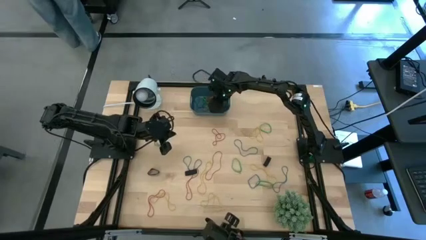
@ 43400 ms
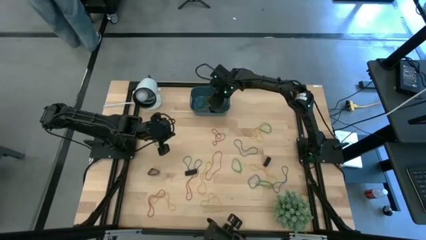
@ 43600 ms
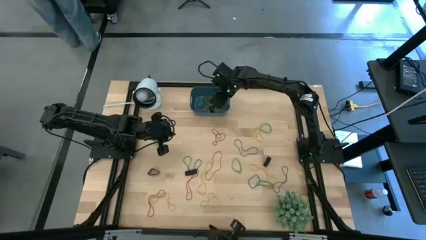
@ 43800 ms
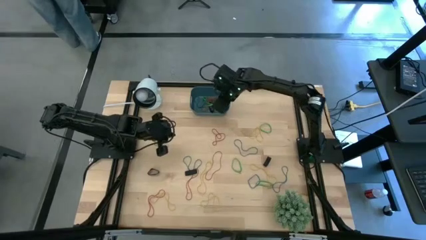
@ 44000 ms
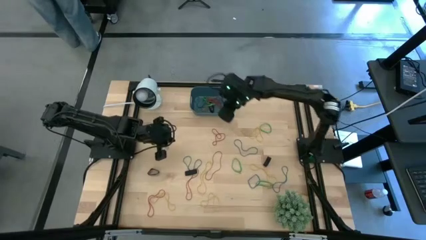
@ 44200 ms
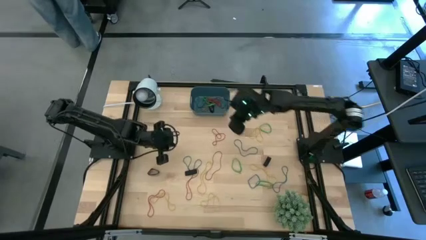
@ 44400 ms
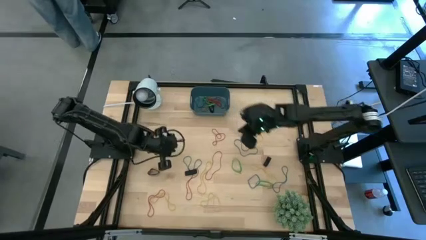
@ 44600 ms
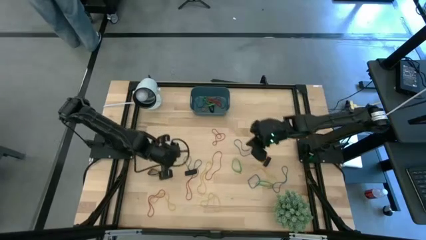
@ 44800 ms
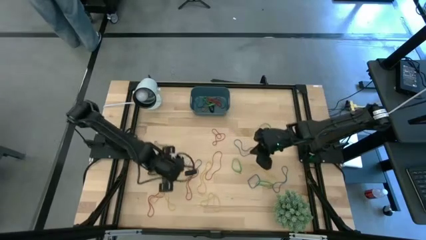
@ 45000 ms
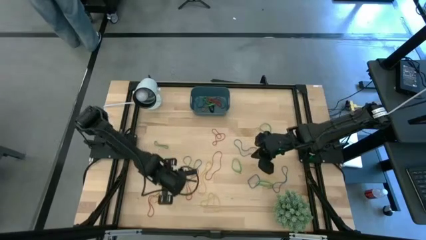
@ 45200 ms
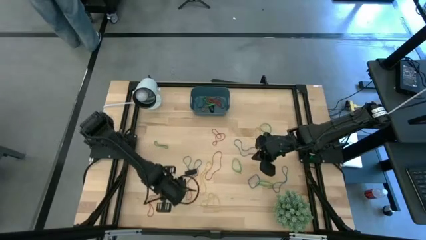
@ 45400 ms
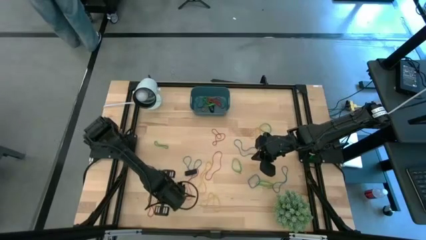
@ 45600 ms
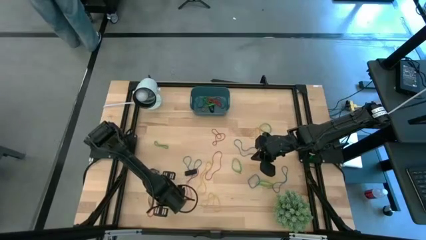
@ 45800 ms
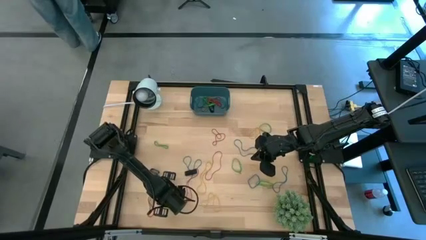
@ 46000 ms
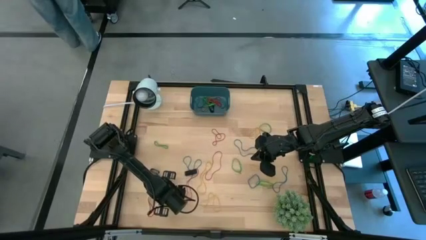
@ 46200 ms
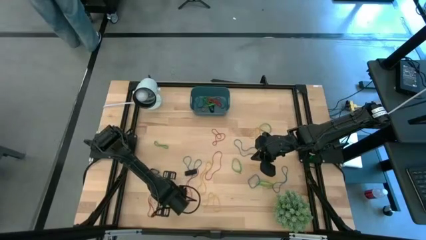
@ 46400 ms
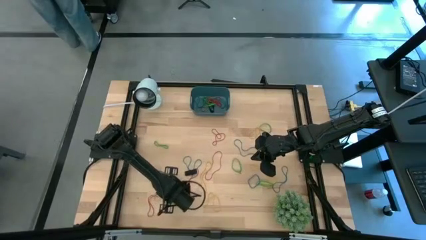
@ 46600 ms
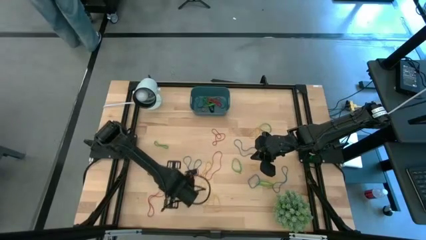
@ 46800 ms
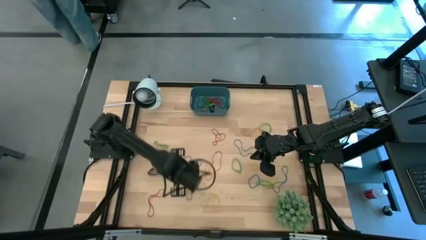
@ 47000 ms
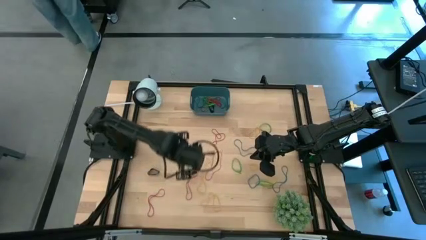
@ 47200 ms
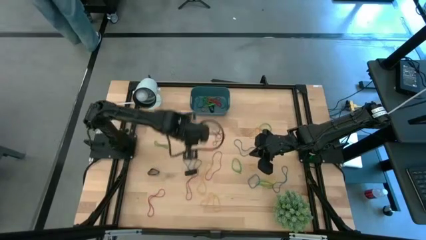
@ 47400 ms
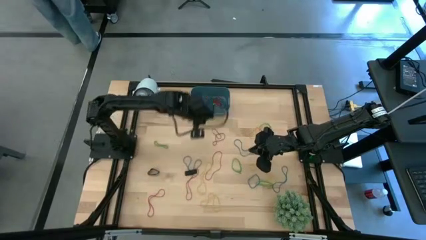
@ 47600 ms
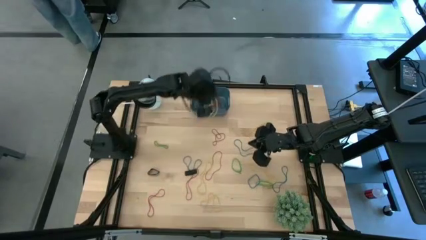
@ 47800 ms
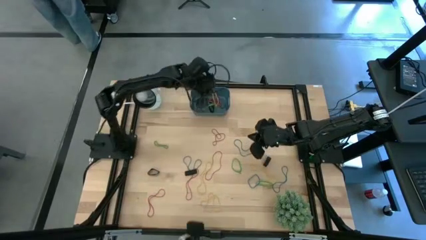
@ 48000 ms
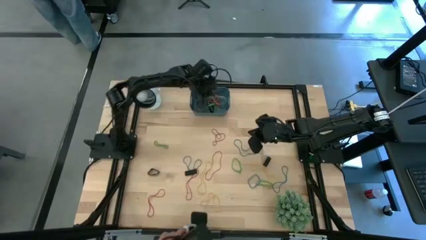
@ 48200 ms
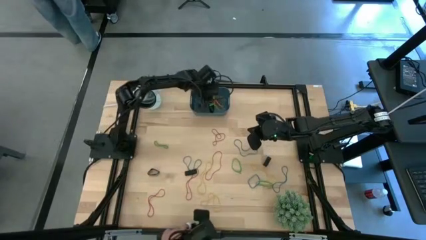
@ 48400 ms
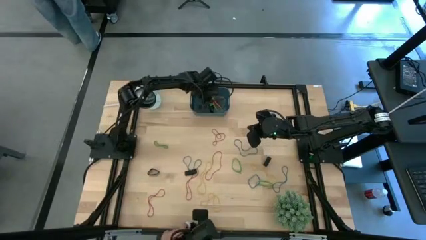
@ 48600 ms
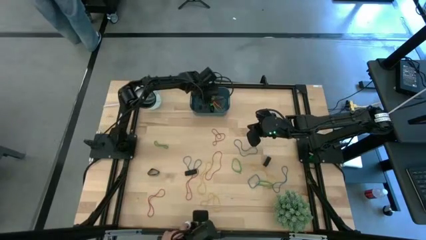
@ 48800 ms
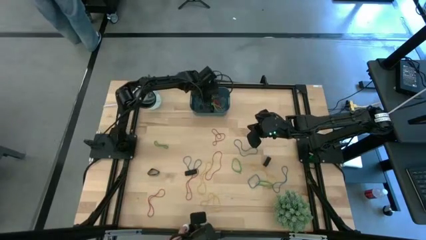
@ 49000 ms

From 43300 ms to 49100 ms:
Task: Pick and place rubber bands into bin
Put the yellow rubber band into the blue bin

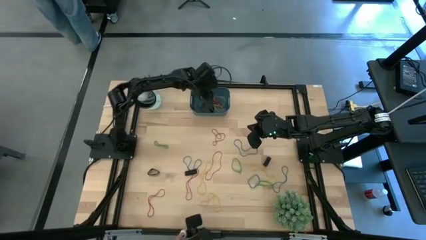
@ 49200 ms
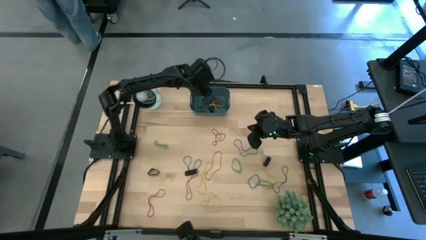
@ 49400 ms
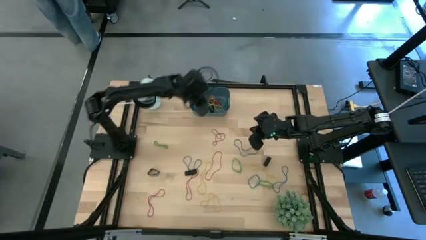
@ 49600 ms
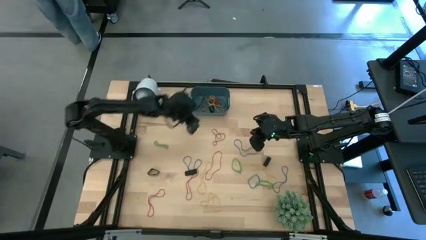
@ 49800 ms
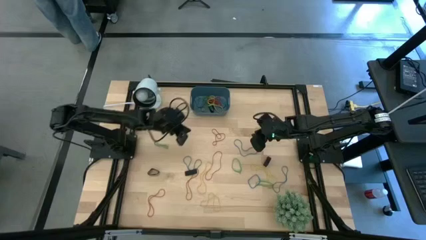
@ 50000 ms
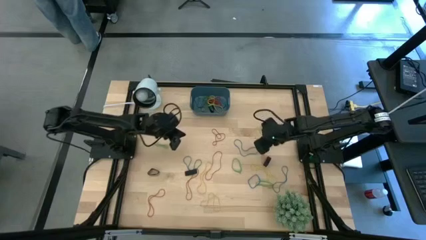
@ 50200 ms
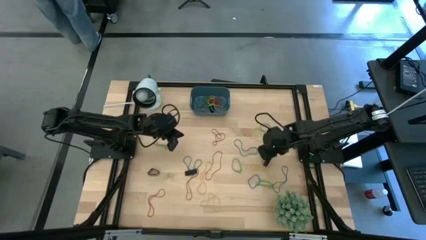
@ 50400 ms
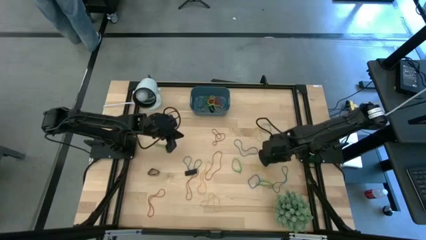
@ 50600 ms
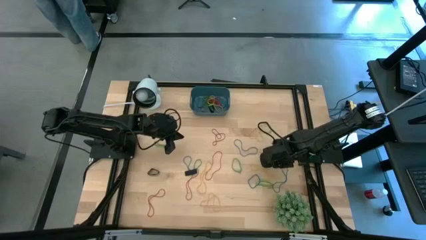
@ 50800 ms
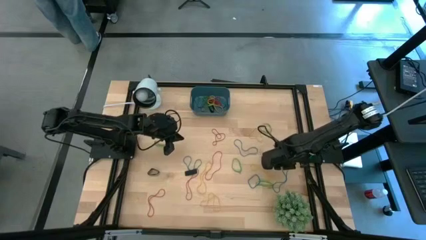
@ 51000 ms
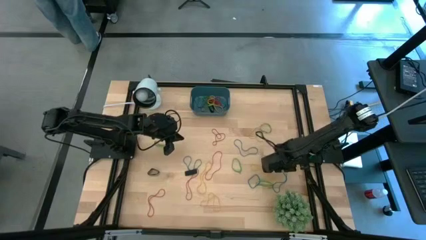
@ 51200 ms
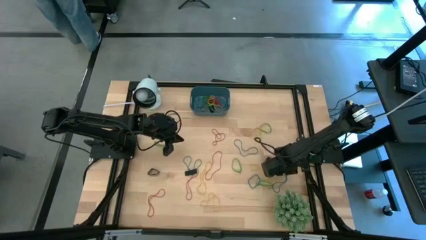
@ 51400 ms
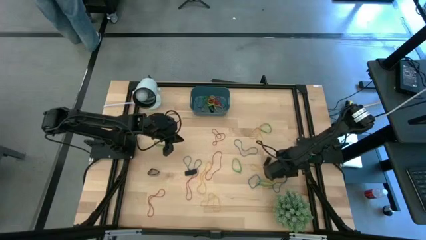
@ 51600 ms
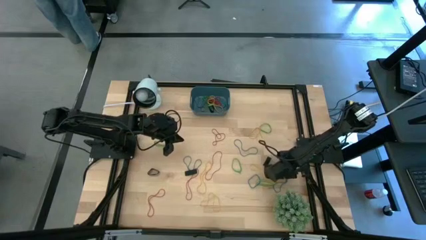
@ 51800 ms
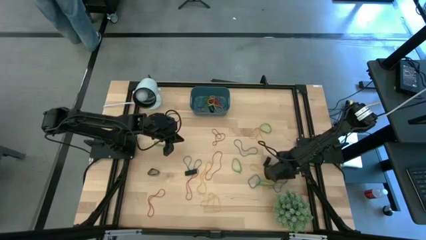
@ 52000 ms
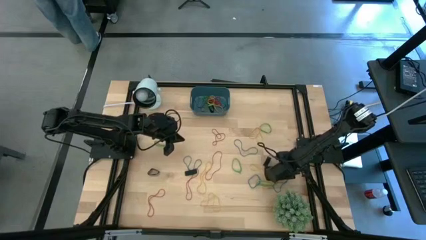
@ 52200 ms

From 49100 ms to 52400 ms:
Put the blue rubber band into the blue bin

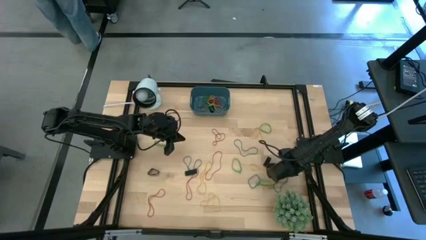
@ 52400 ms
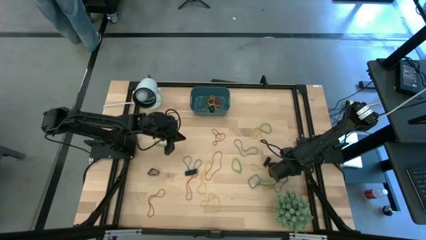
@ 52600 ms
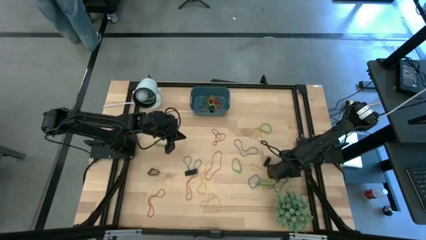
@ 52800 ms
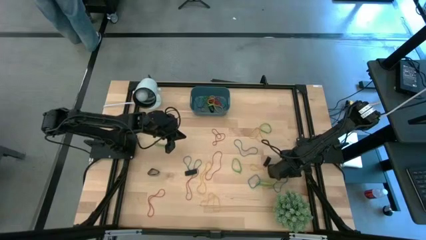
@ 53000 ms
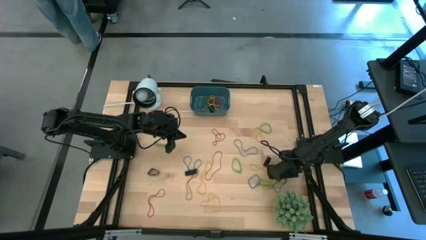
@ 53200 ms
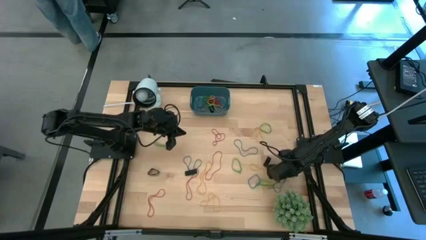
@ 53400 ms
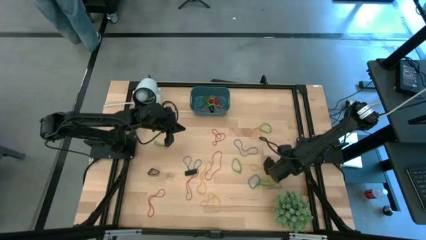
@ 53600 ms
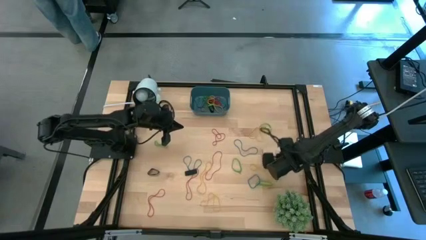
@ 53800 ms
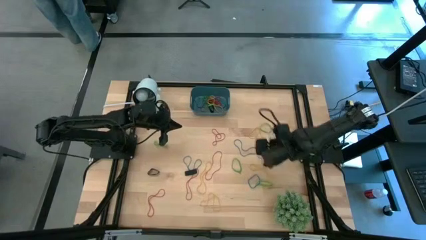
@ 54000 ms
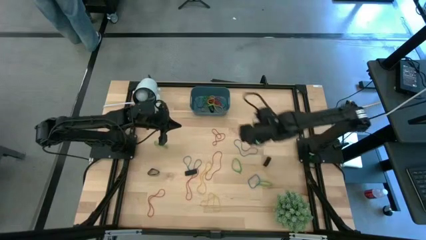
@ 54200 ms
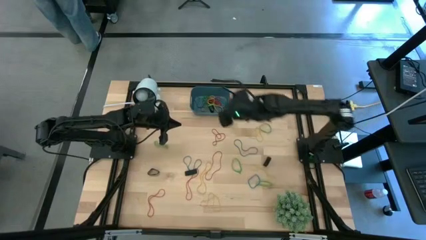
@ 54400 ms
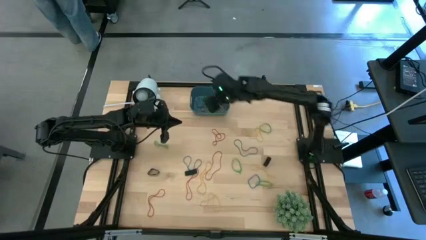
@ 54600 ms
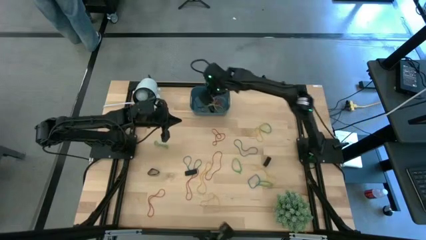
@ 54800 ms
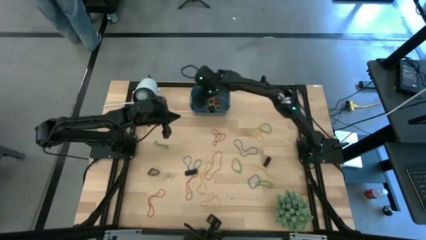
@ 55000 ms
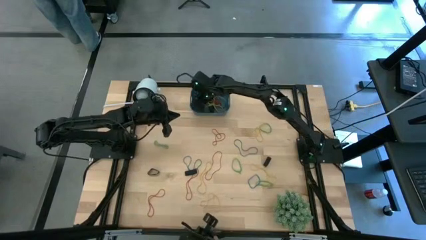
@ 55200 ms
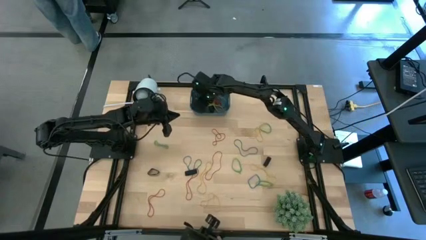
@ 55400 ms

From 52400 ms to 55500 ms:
Put the blue rubber band into the blue bin

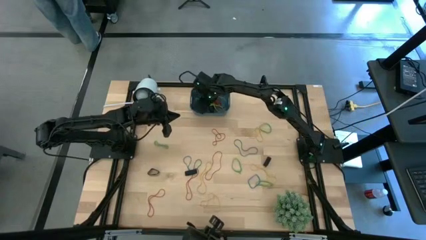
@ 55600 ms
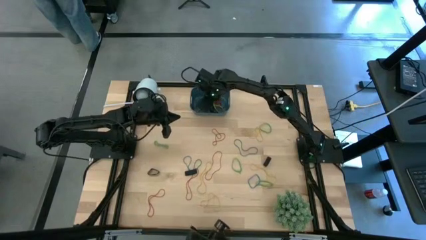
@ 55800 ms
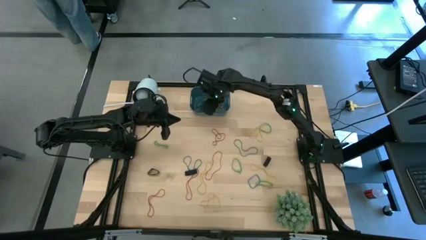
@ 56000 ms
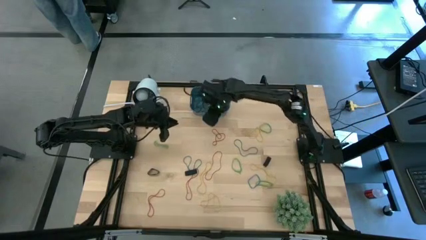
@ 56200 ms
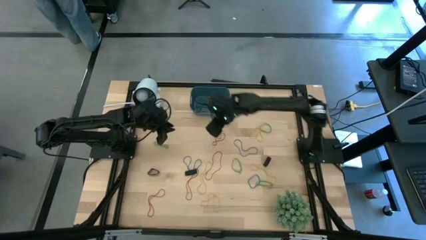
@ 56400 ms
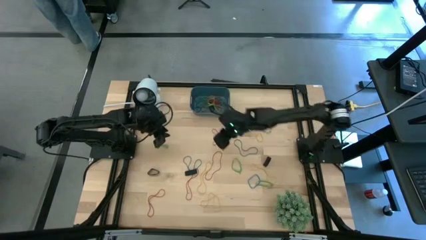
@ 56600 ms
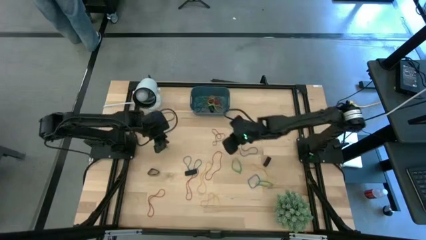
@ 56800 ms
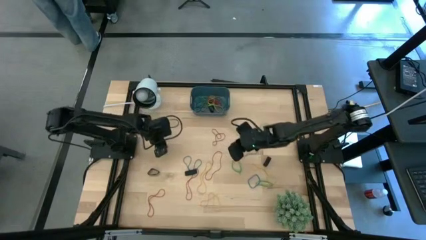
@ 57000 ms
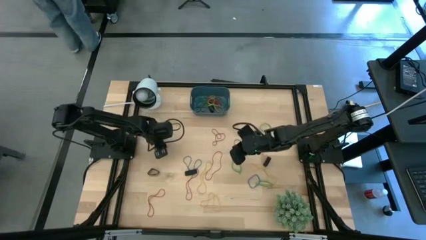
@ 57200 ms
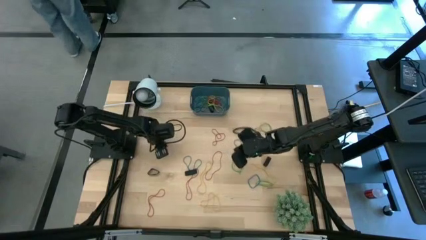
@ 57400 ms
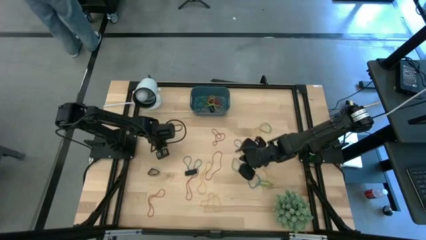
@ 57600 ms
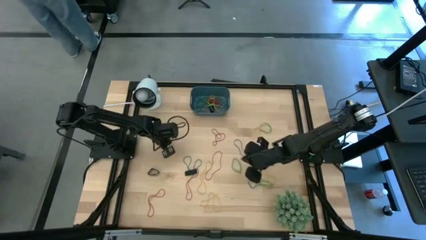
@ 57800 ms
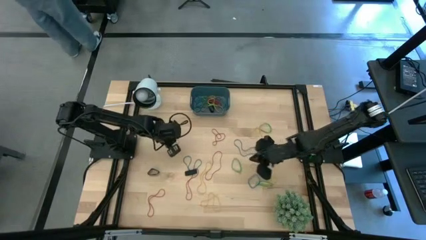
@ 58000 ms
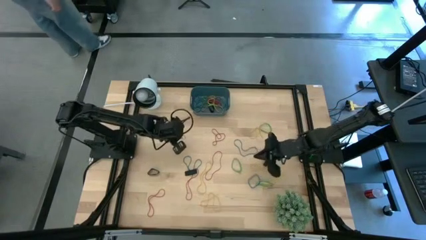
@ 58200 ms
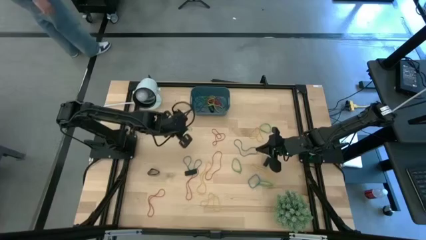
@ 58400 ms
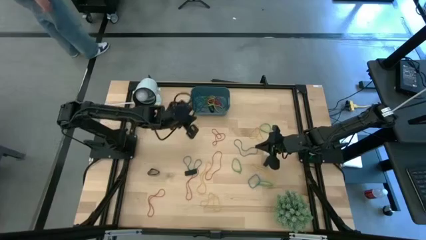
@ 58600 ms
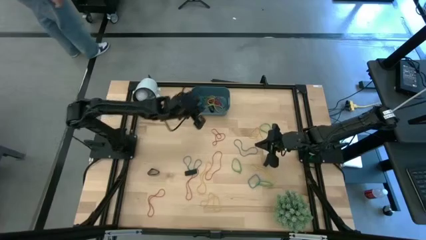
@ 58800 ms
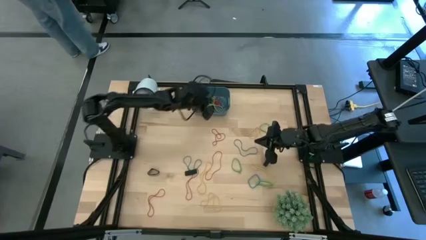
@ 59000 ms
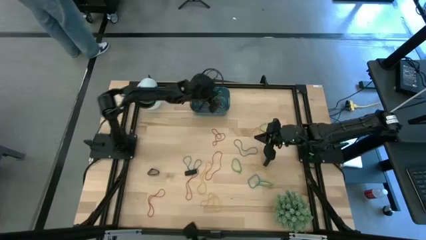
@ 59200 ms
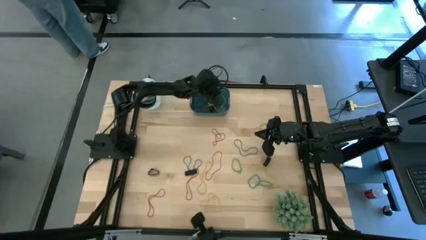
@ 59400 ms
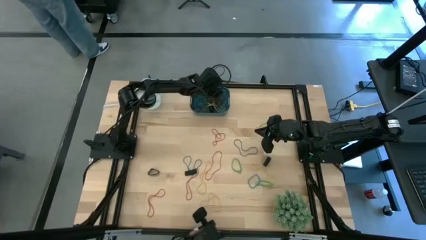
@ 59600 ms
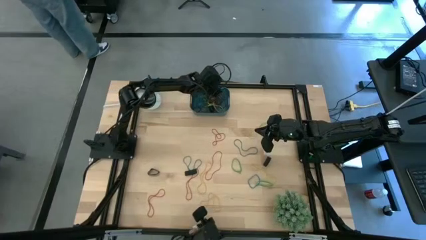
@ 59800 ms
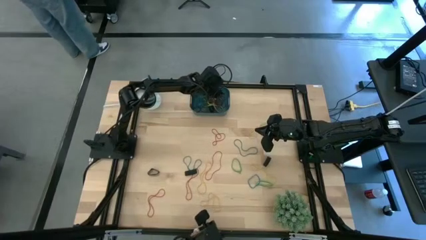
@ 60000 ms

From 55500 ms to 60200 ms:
Put the green rubber band into the blue bin
